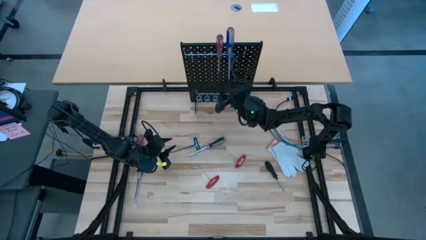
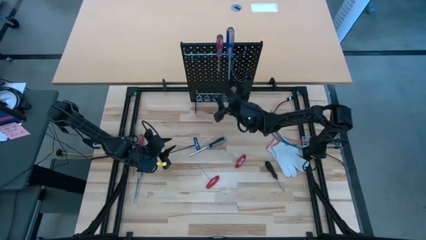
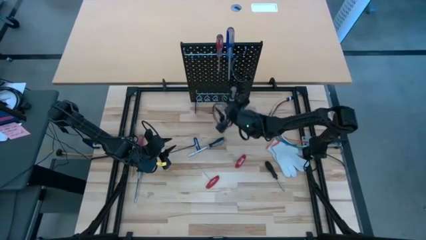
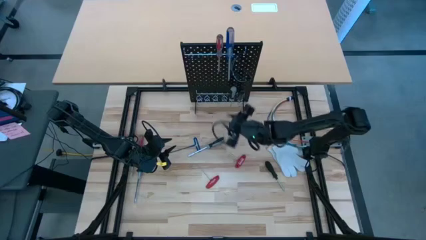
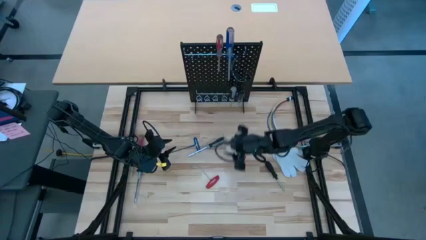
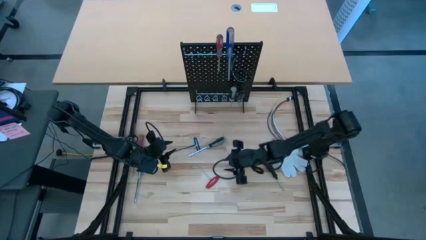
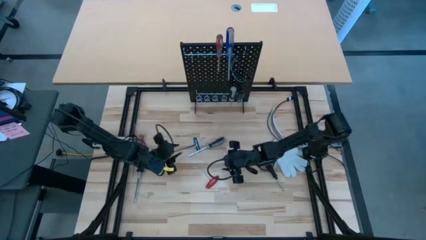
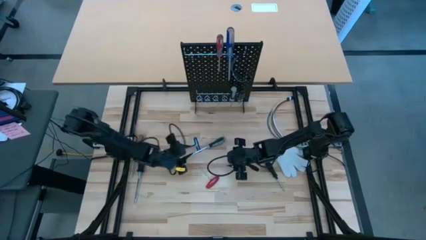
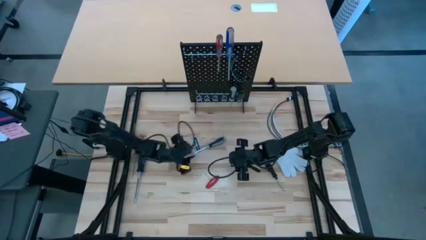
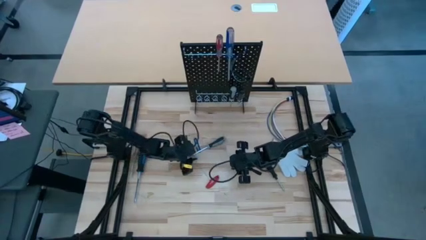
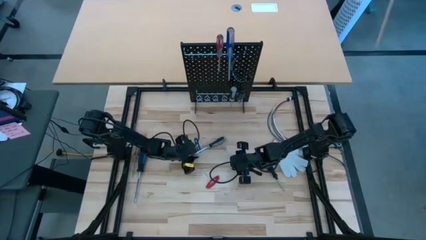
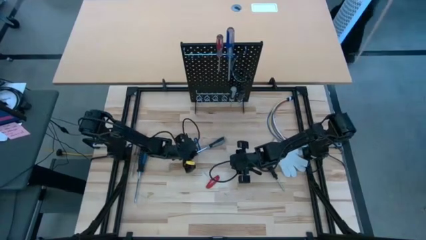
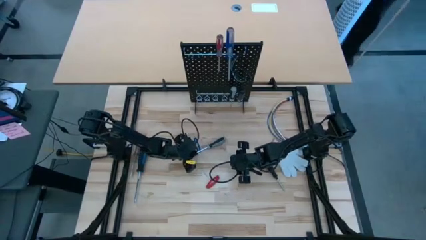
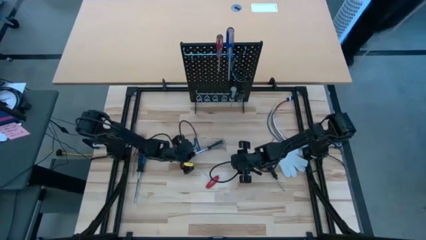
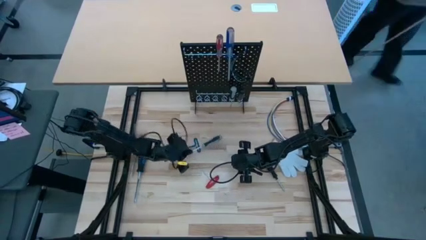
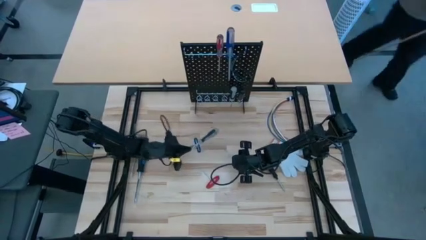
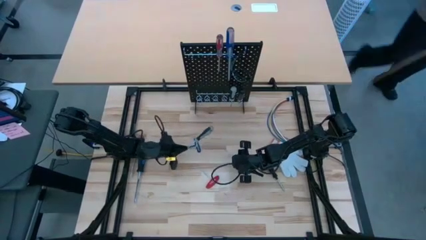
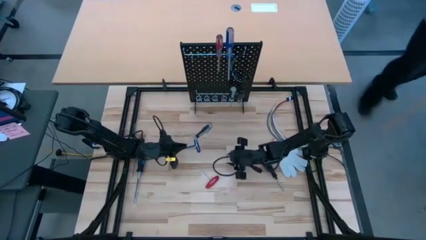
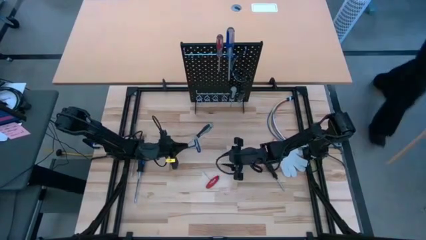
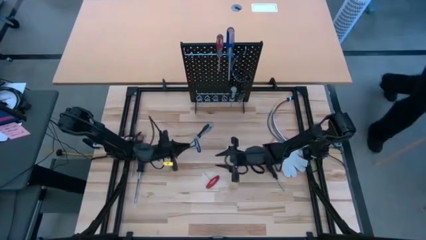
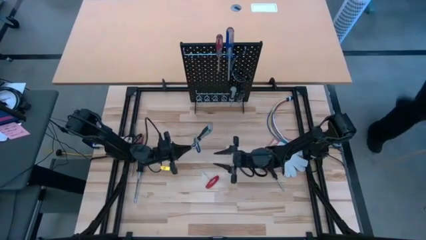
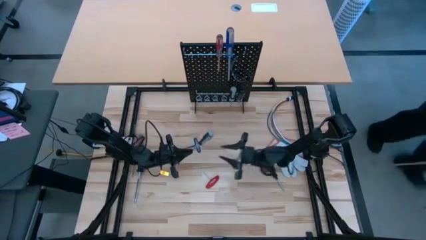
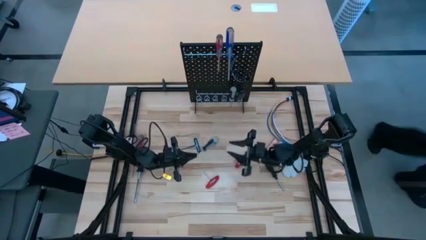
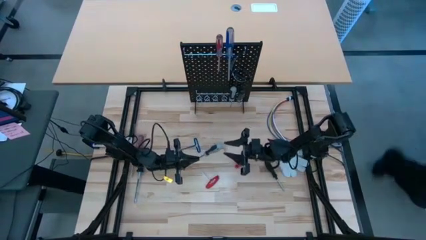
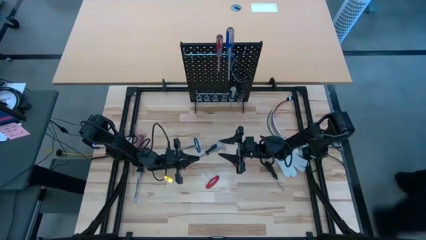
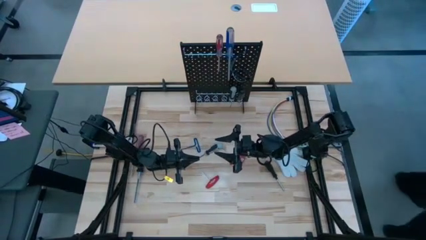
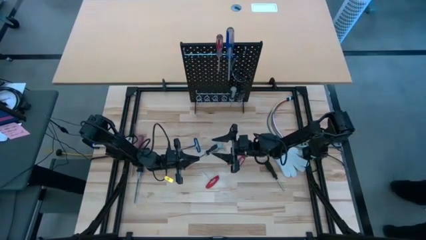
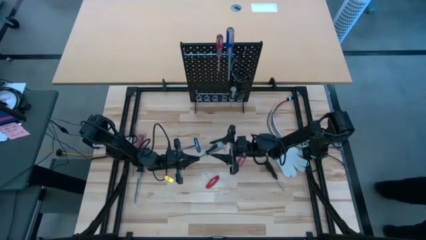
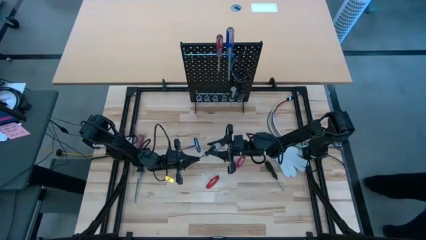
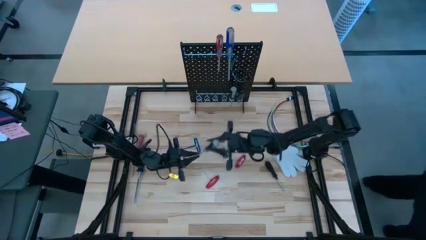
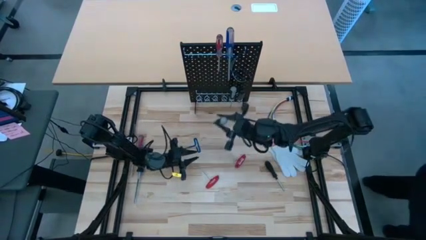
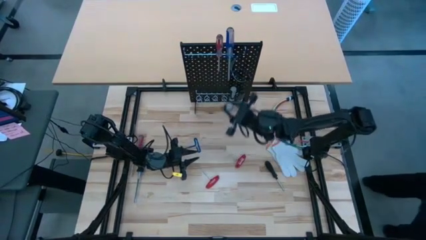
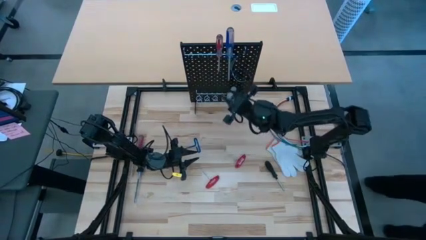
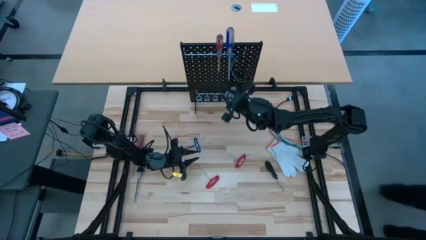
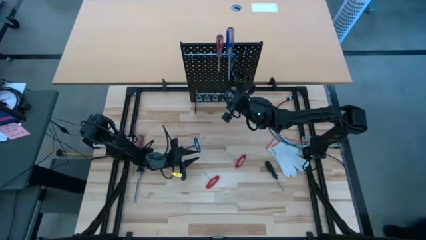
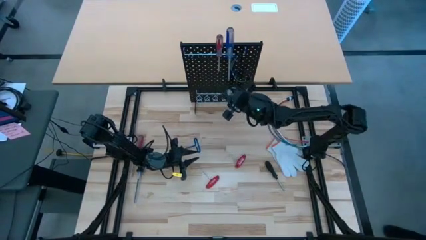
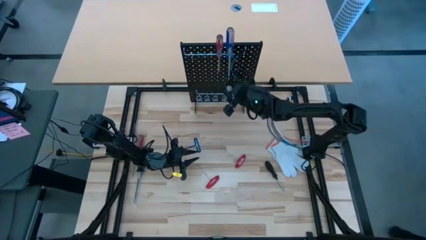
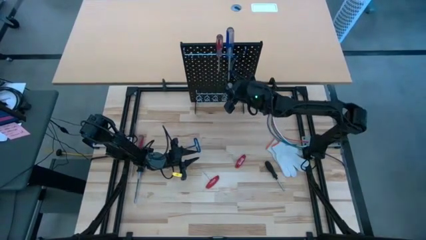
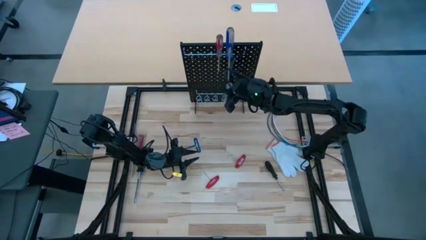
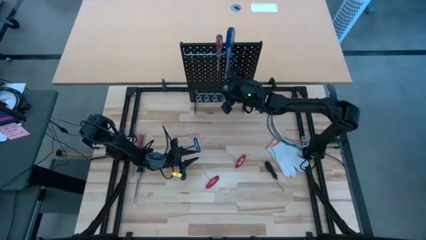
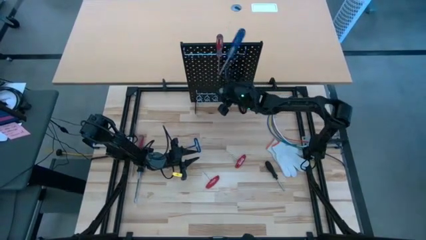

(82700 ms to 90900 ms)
Task: Hang tools onto peg board
Hang the gray nut driver on the pegboard

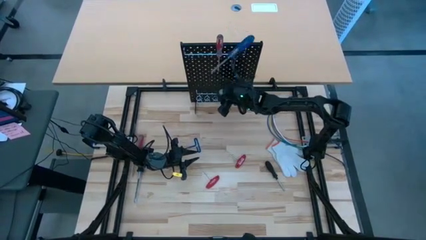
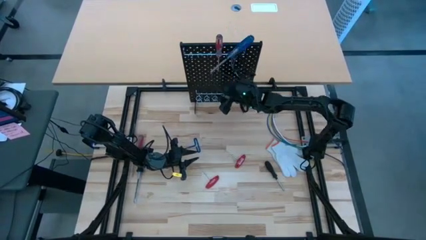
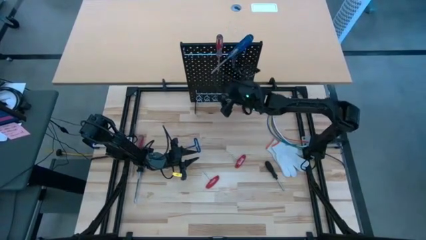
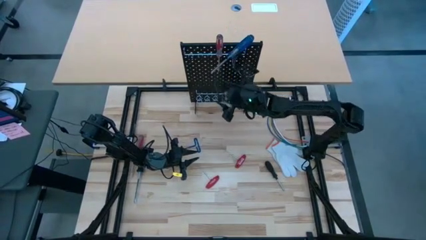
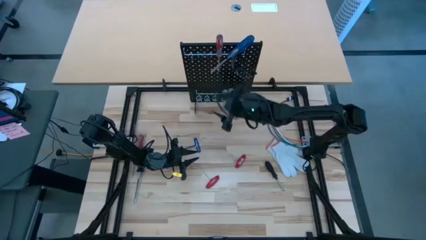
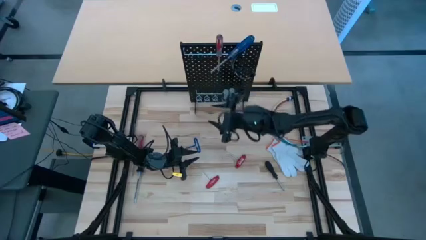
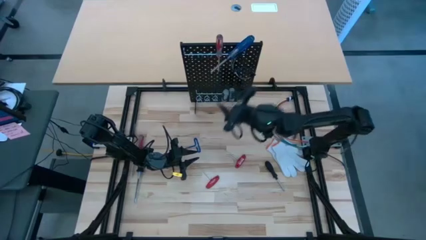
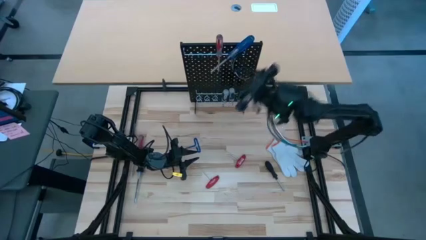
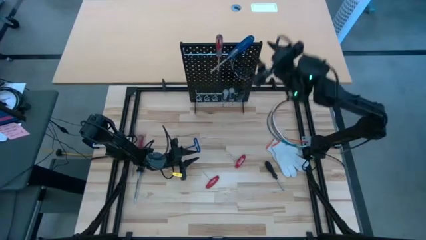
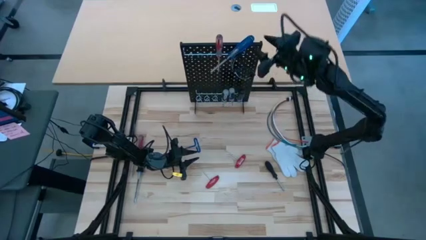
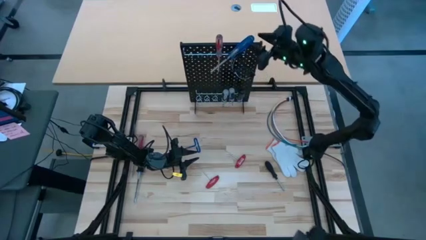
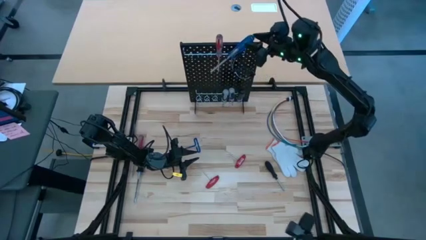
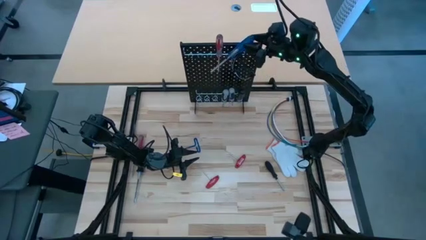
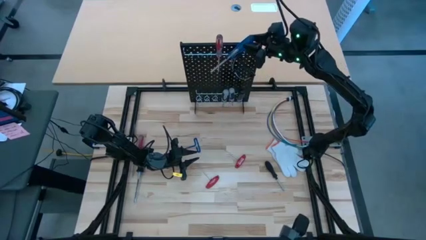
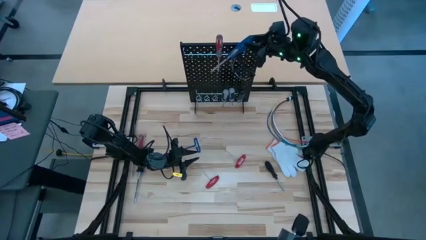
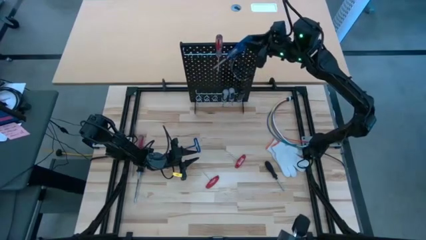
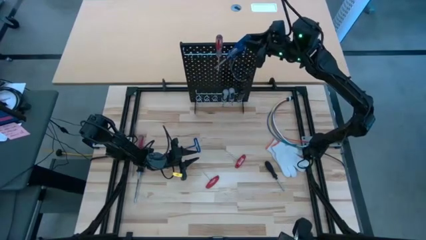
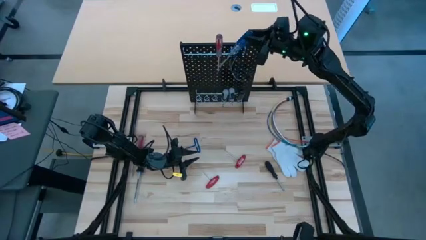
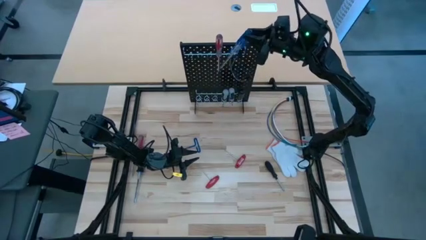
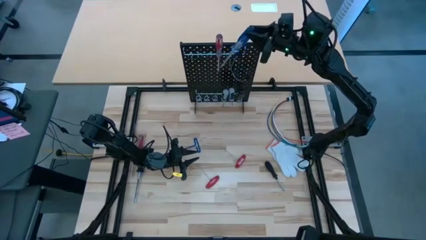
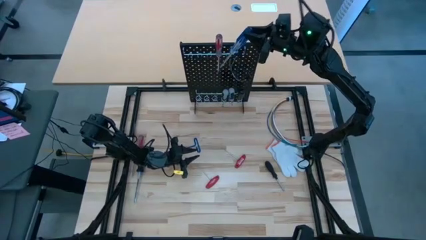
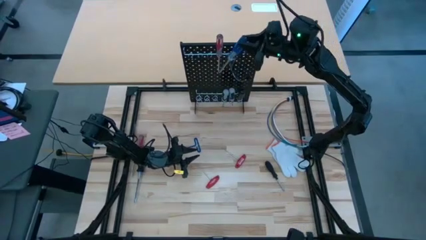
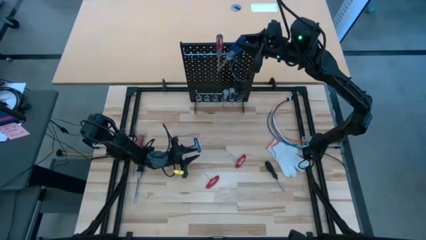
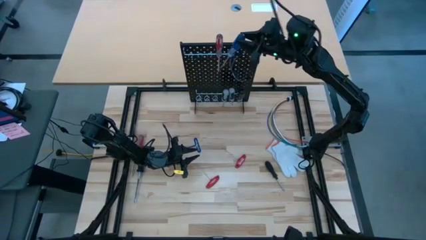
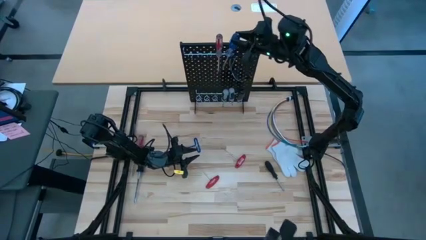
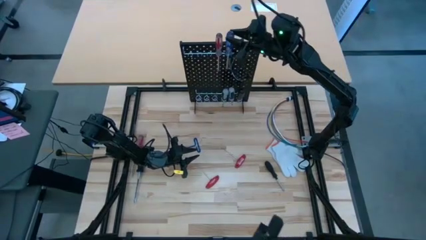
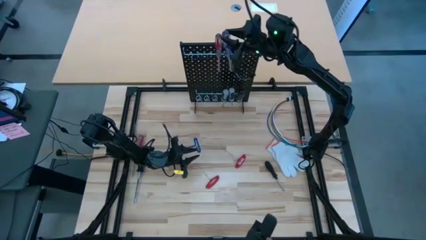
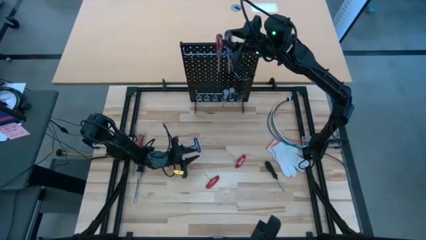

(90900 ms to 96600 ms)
Adjust transparent blue screwdriver on the pegboard

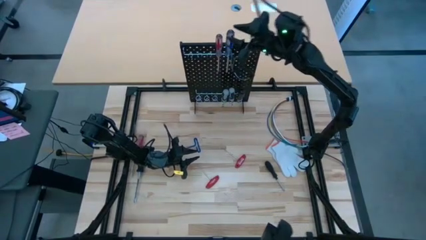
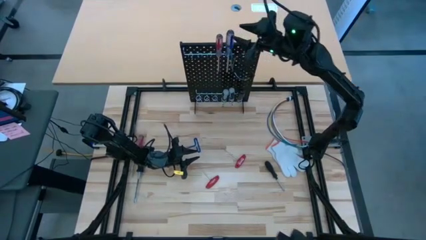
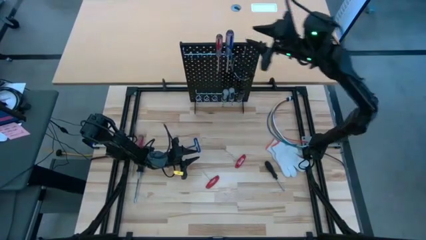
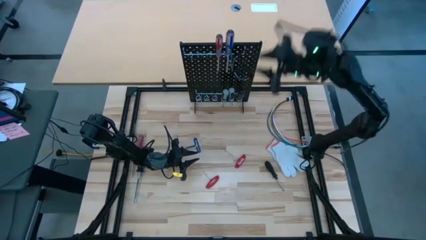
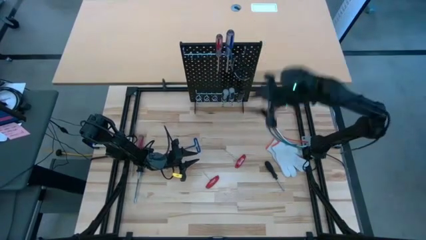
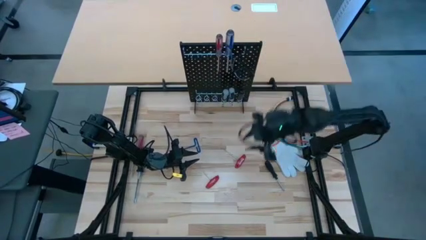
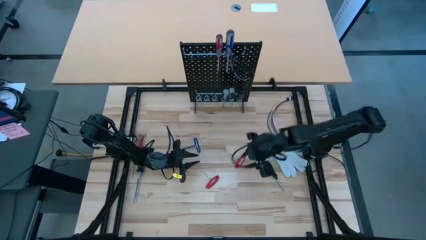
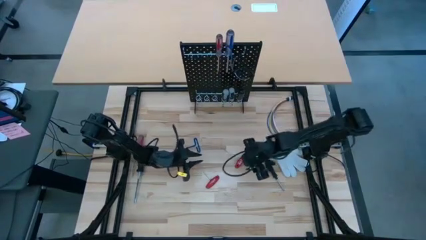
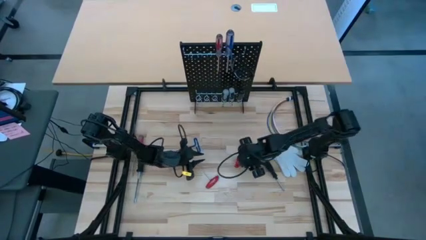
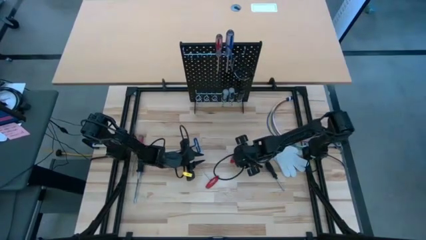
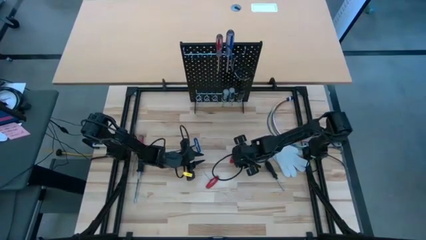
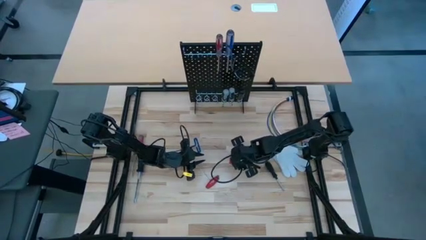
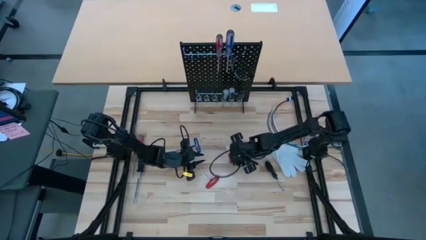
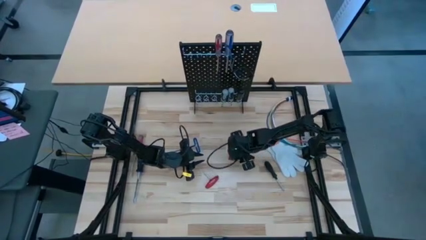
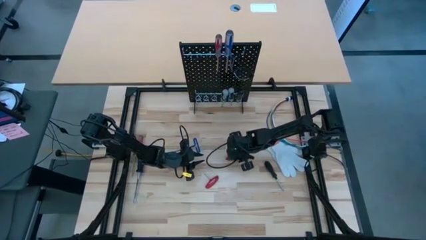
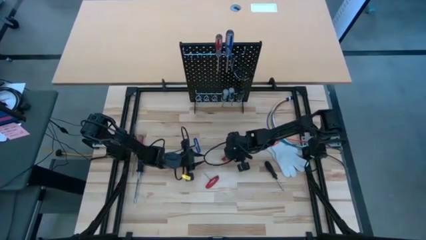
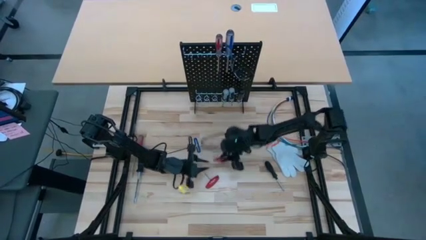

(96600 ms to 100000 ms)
Hang the top red allen wrench on the pegboard
